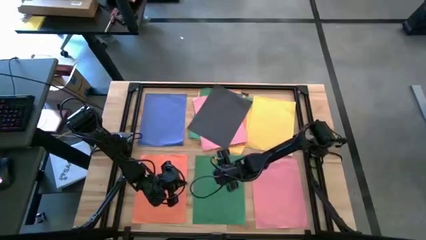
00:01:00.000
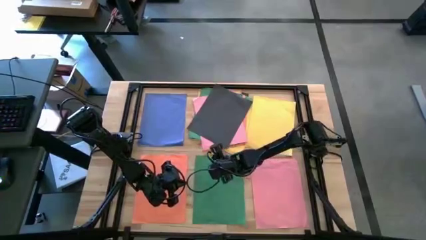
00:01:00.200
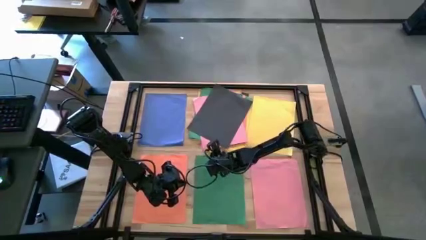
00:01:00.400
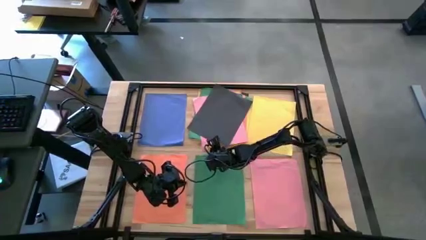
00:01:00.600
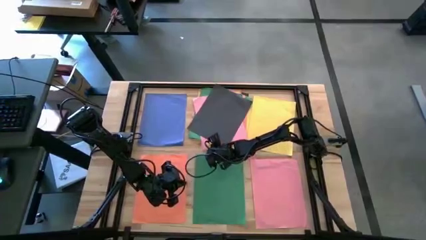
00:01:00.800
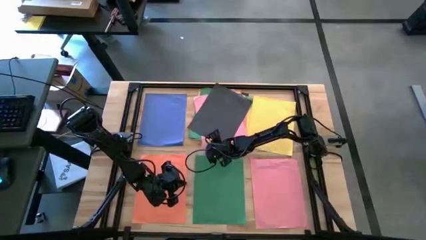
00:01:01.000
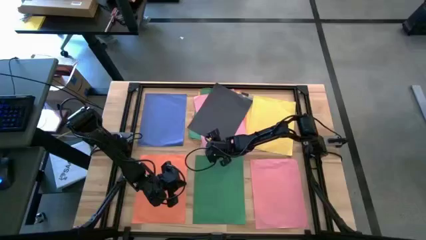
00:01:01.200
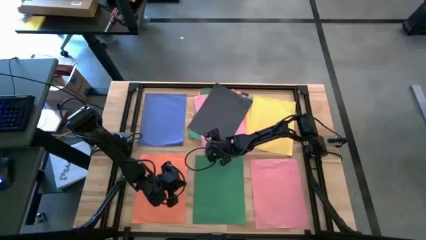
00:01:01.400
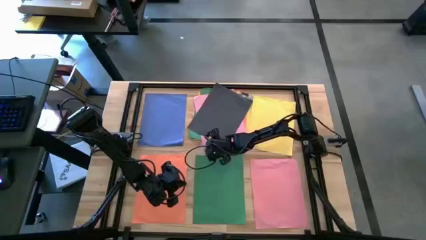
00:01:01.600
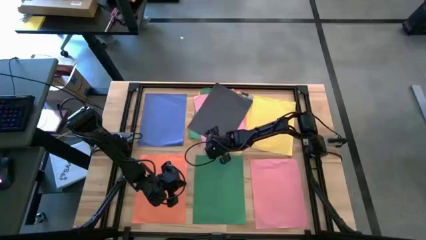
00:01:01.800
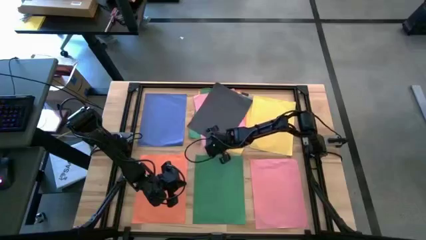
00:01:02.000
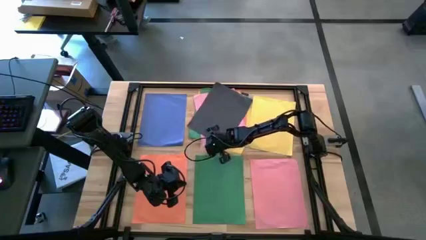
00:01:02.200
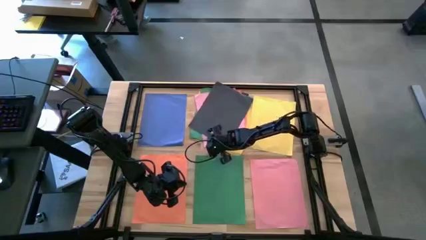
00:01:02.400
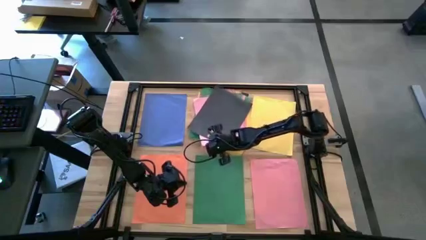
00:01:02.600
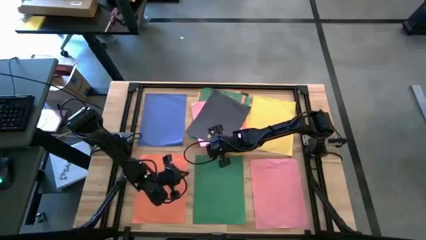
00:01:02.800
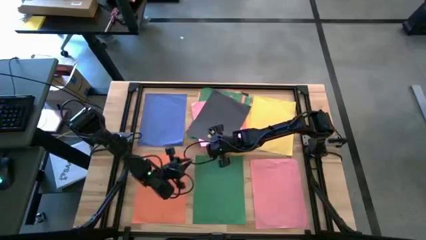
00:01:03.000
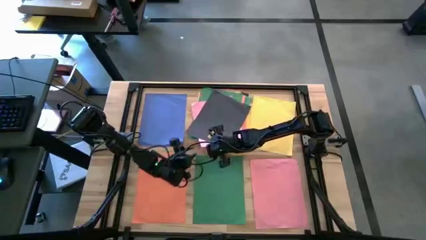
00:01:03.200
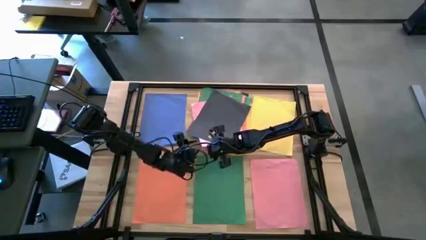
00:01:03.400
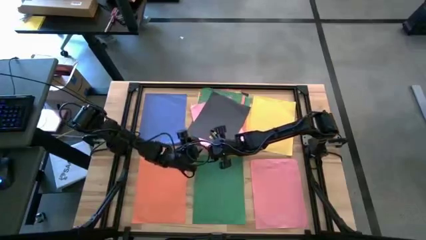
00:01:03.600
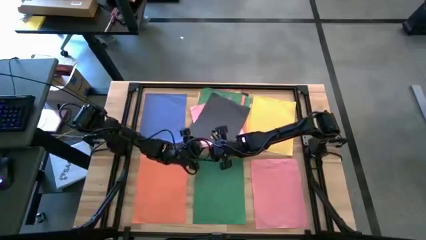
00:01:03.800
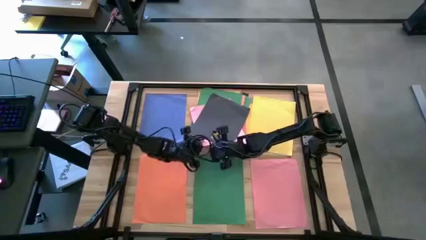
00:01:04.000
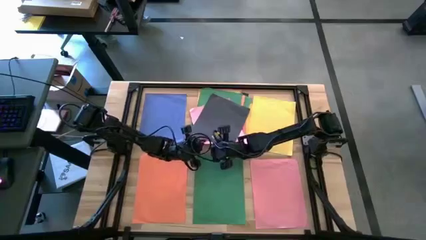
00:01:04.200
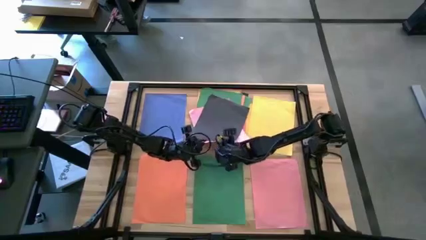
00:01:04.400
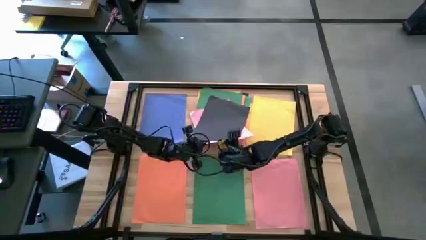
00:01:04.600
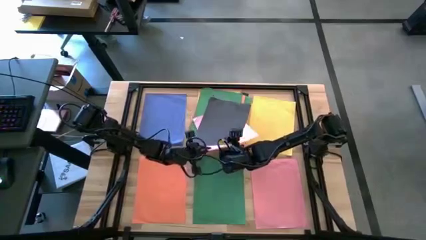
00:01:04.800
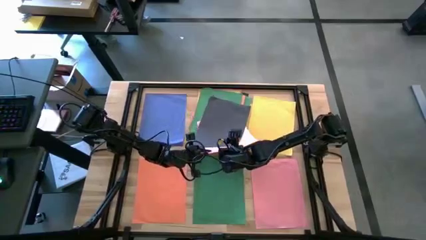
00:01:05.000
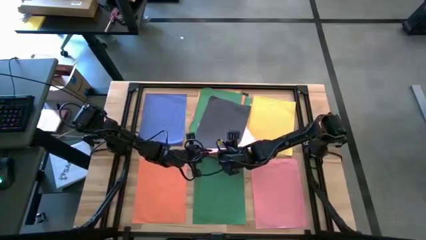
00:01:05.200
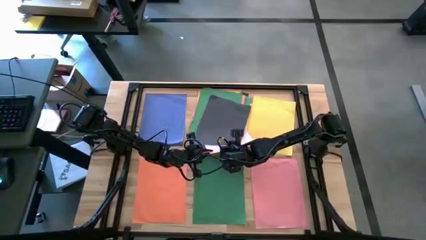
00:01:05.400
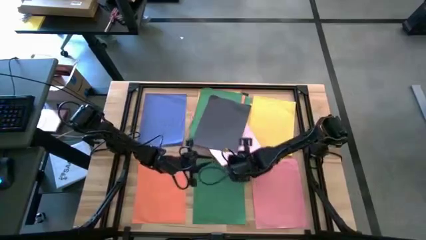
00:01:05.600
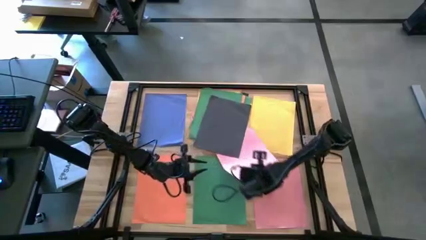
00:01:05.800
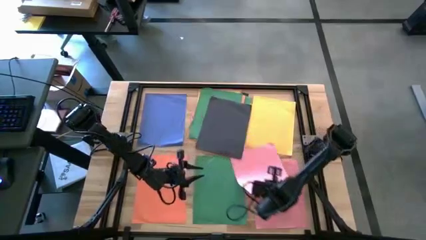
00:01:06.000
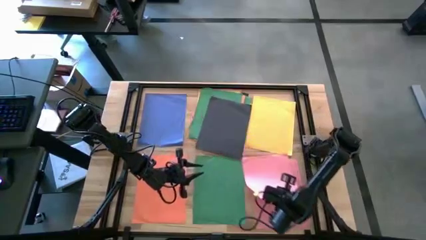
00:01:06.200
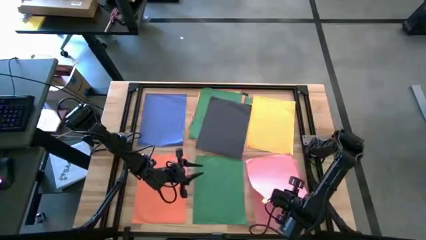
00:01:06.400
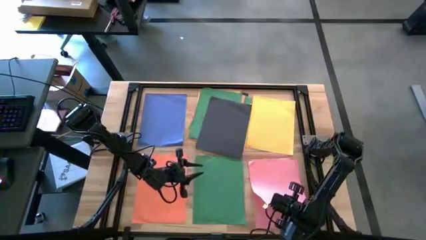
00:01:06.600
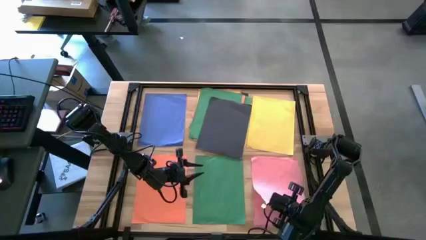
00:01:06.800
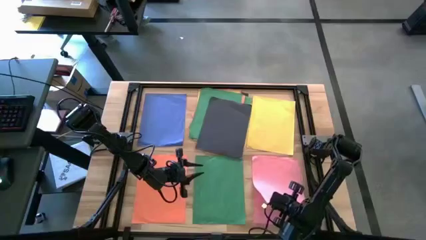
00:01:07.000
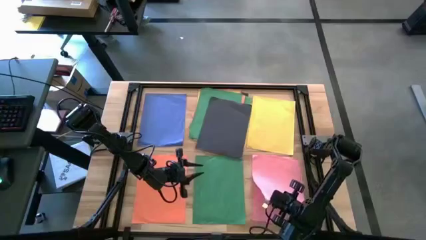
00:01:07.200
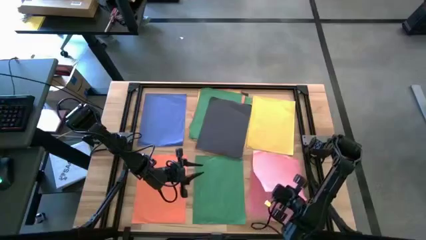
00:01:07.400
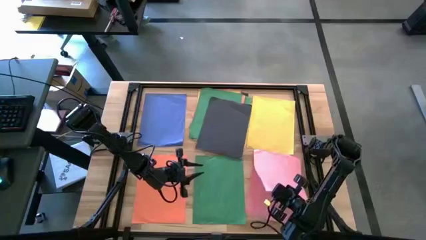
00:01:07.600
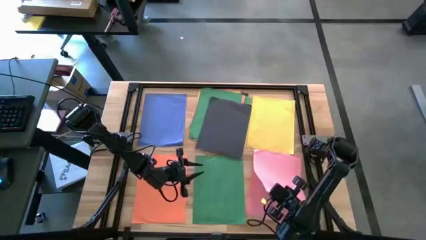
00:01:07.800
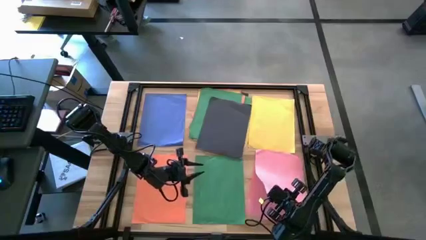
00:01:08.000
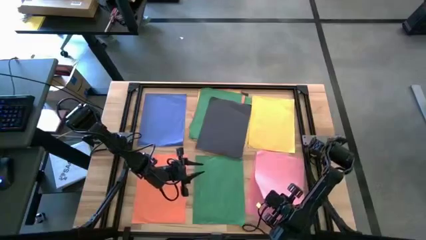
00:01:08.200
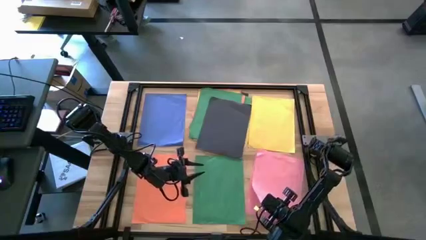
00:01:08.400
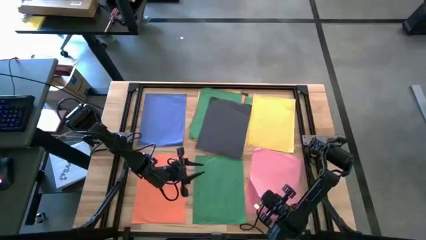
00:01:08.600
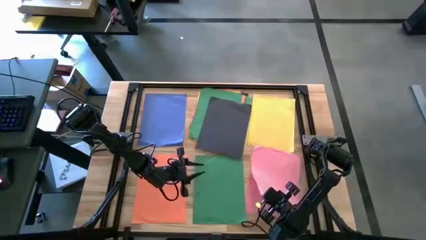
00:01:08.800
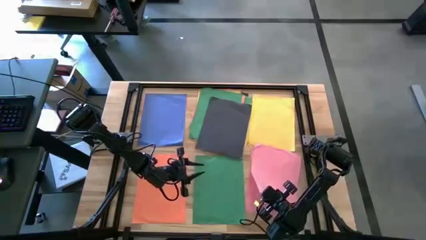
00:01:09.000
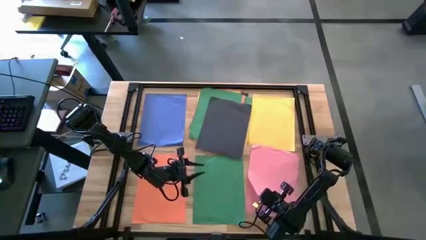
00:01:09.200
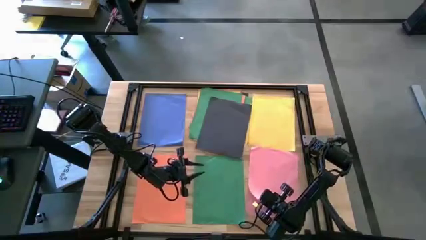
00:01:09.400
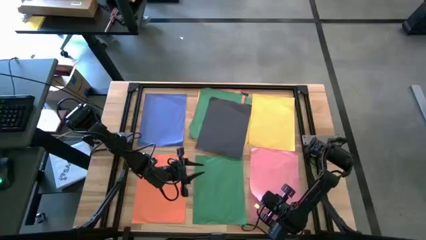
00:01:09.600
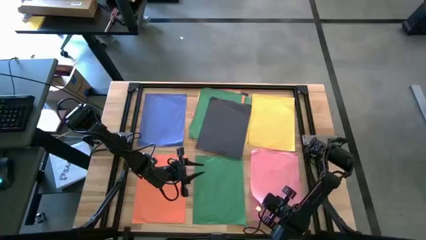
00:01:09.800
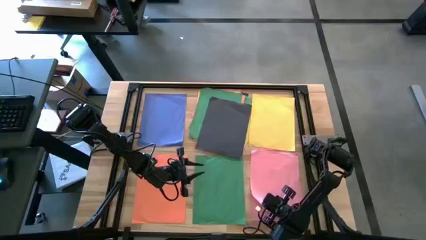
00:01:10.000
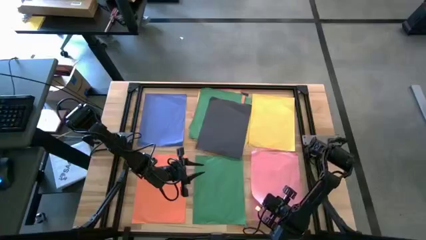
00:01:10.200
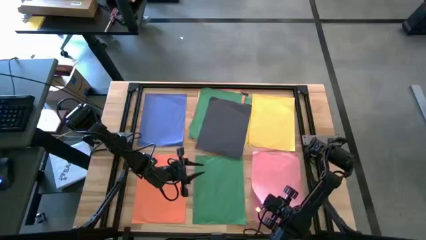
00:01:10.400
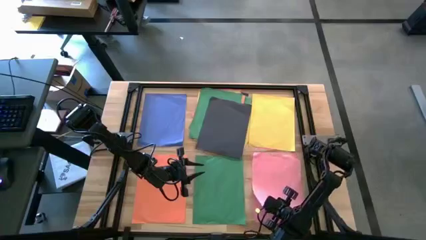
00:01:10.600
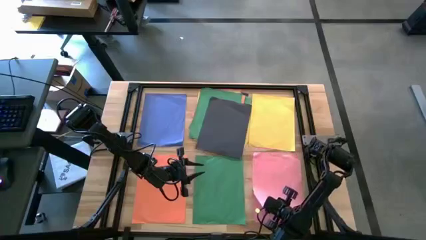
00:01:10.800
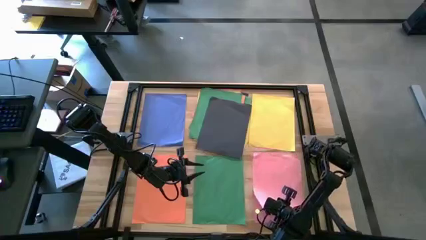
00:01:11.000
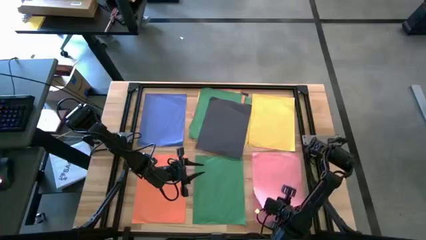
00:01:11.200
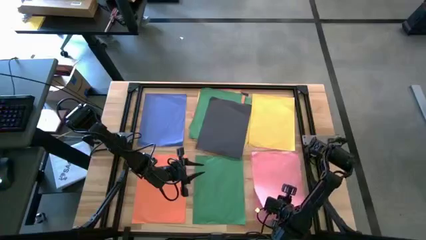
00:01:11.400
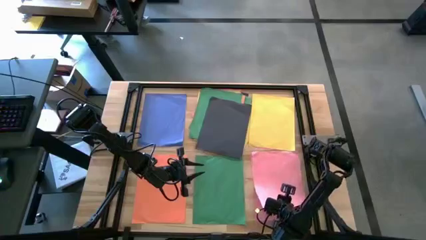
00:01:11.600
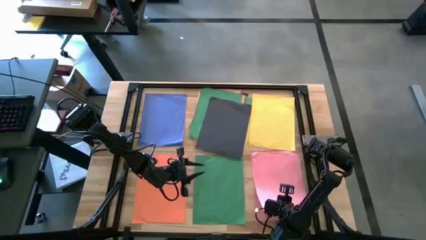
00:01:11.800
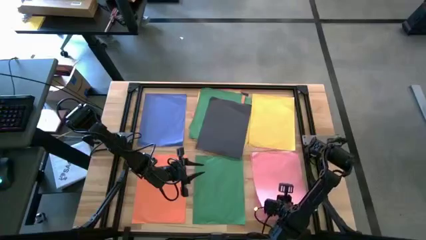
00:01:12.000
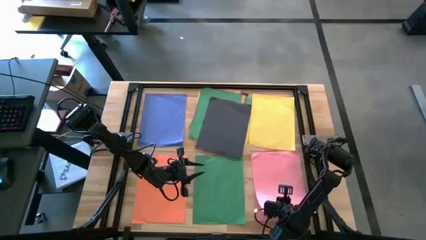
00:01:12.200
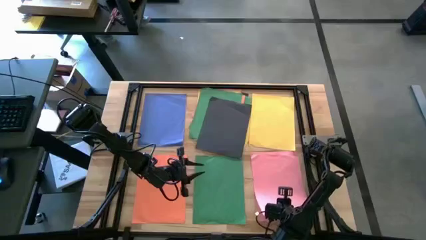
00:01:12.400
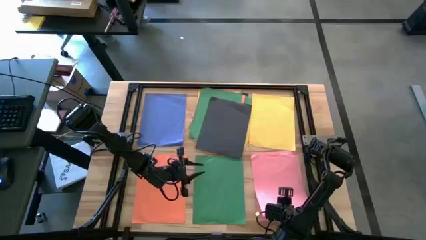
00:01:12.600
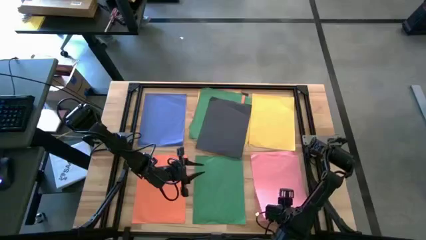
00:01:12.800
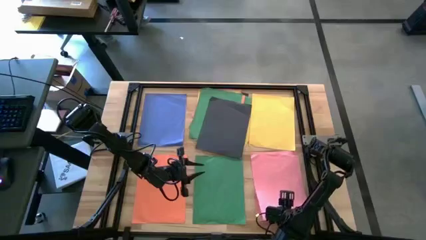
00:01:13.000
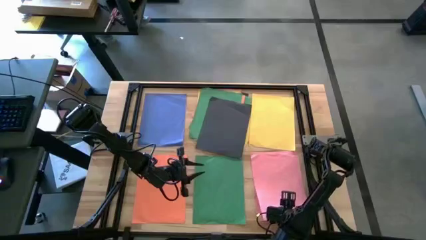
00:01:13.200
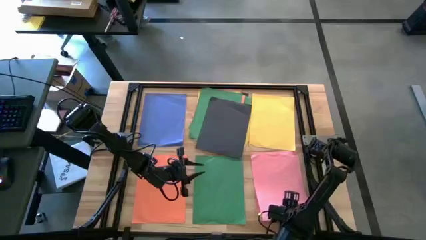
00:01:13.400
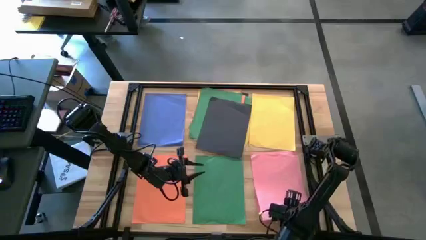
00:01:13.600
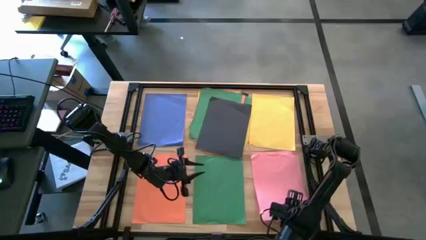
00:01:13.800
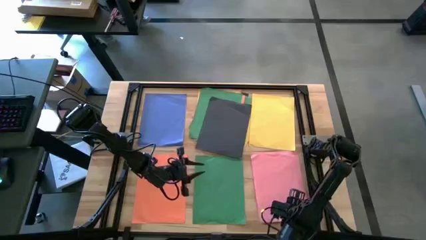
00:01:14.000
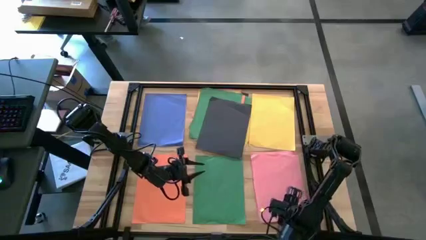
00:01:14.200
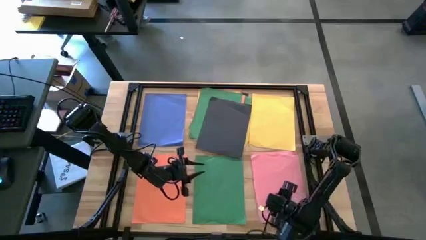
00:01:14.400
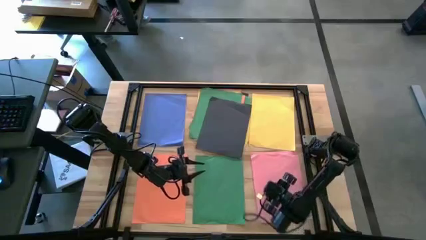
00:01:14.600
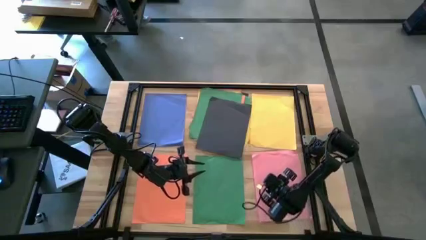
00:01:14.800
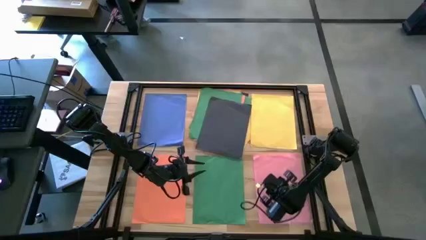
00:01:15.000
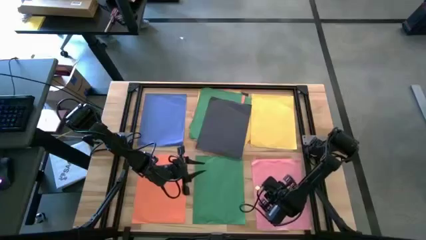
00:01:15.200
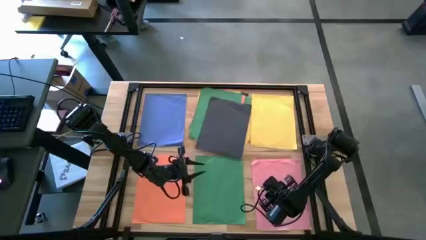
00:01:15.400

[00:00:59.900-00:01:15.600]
Task: Organize paper
Stack the pink paper under the black paper on the bottom pink paper
